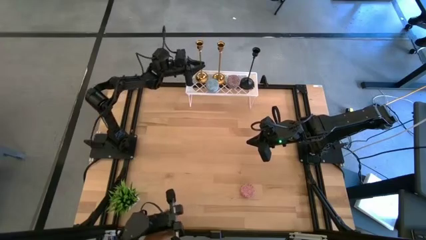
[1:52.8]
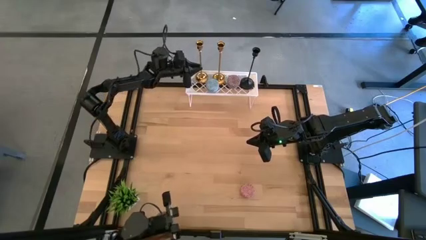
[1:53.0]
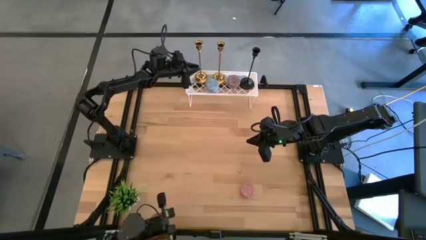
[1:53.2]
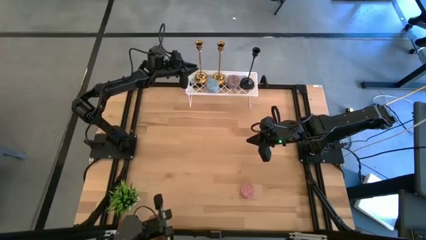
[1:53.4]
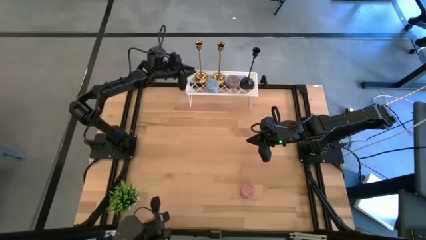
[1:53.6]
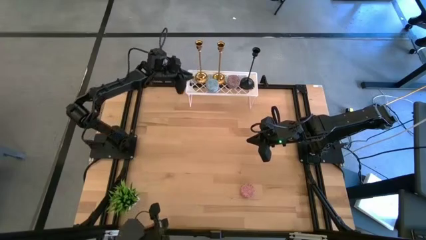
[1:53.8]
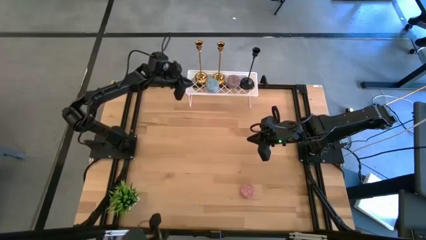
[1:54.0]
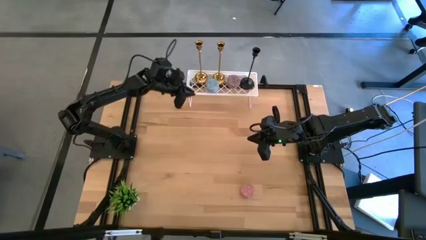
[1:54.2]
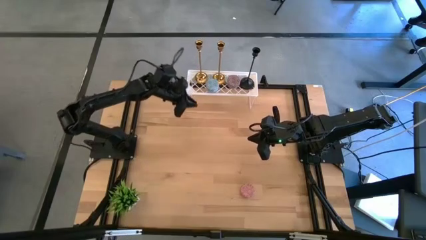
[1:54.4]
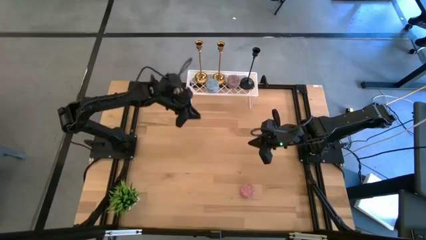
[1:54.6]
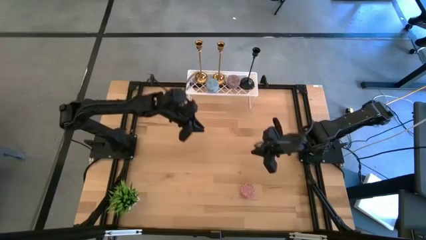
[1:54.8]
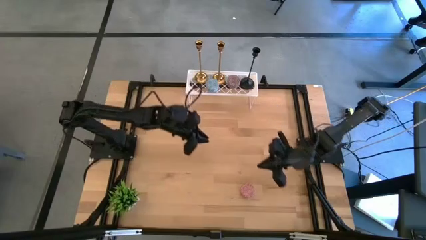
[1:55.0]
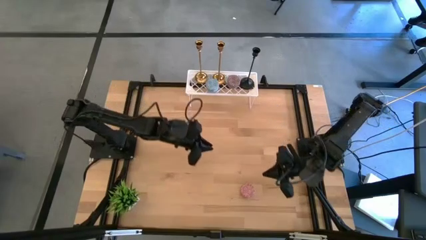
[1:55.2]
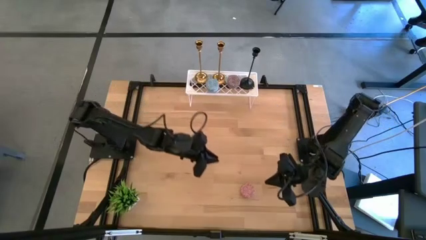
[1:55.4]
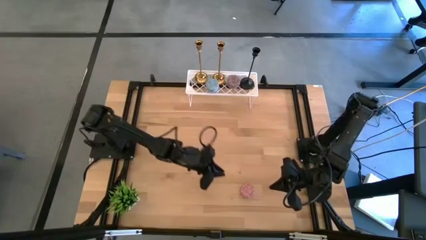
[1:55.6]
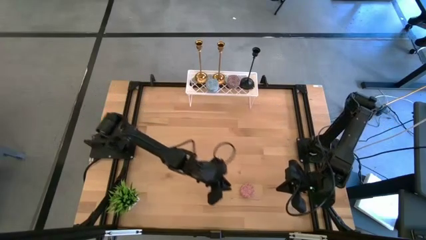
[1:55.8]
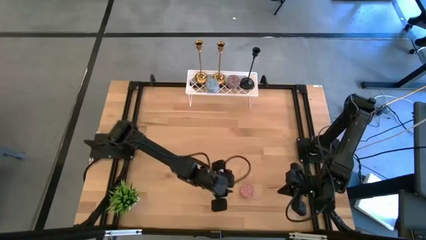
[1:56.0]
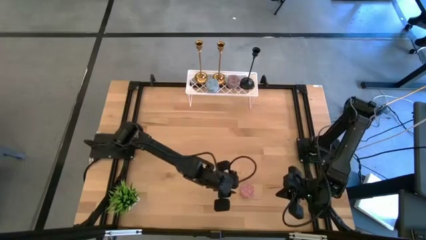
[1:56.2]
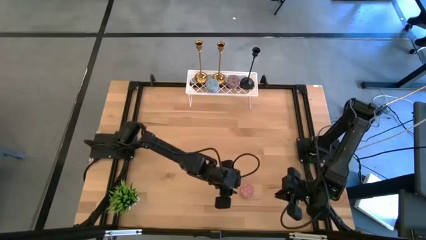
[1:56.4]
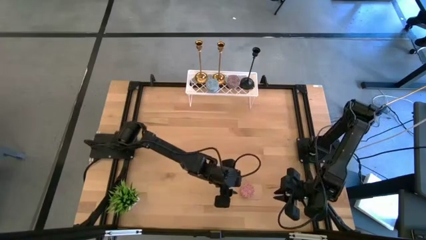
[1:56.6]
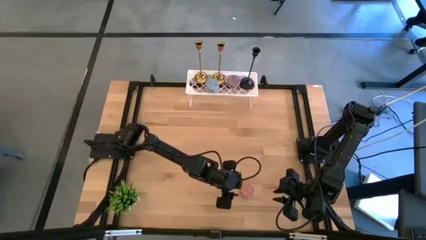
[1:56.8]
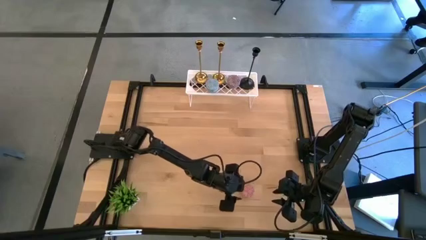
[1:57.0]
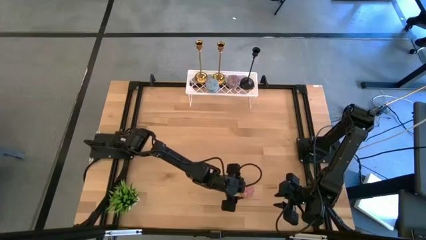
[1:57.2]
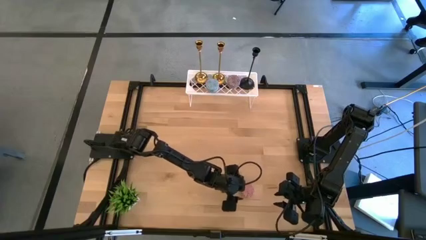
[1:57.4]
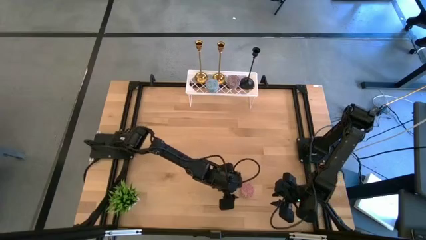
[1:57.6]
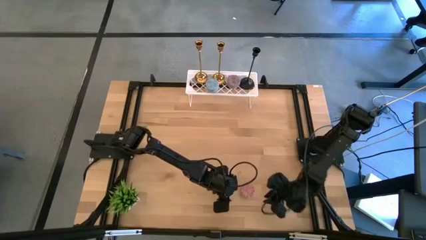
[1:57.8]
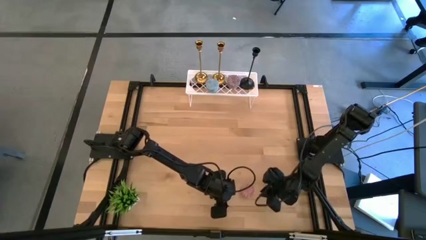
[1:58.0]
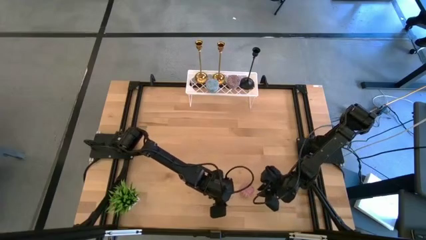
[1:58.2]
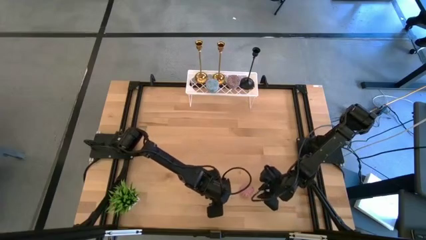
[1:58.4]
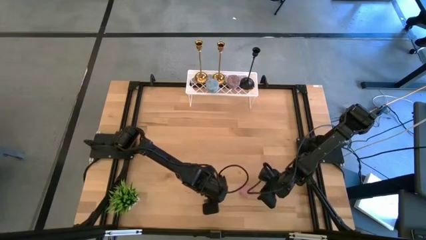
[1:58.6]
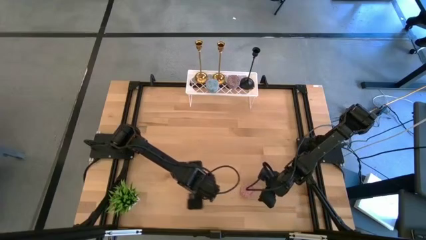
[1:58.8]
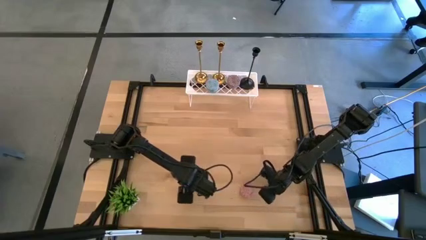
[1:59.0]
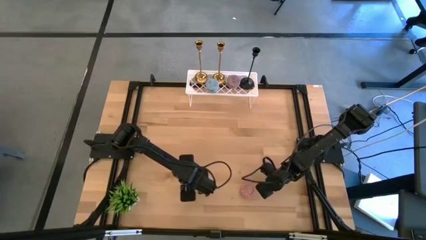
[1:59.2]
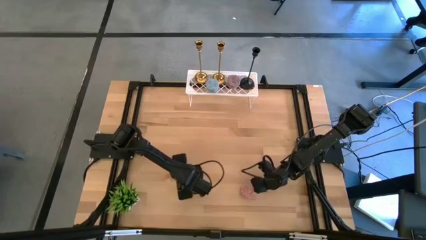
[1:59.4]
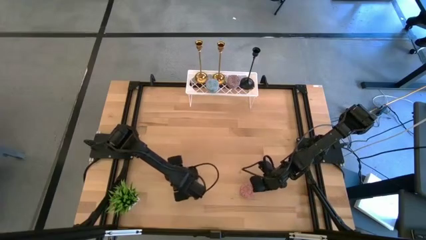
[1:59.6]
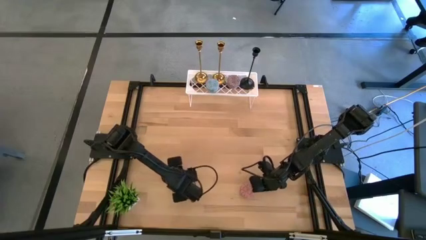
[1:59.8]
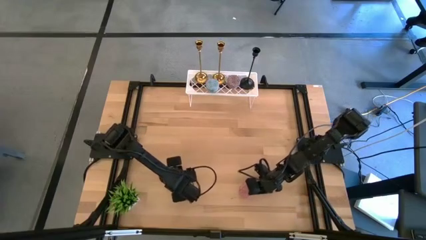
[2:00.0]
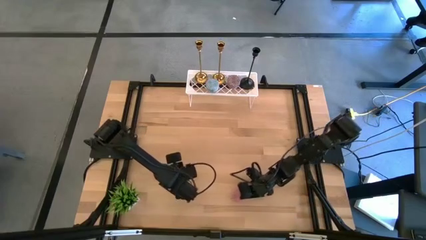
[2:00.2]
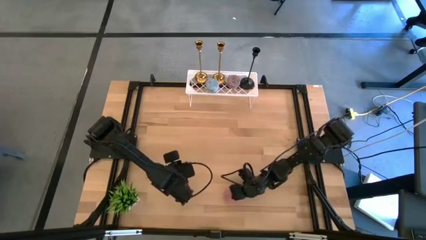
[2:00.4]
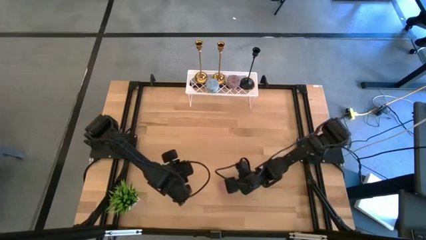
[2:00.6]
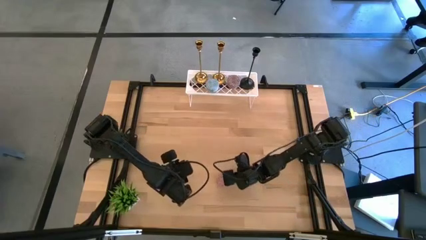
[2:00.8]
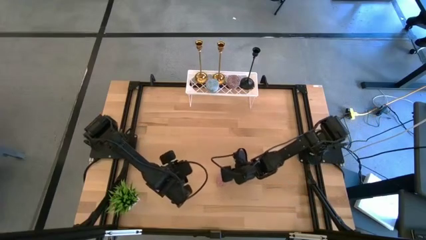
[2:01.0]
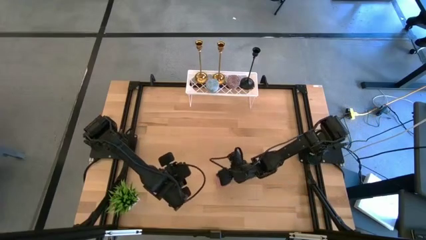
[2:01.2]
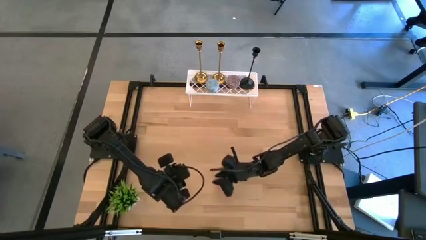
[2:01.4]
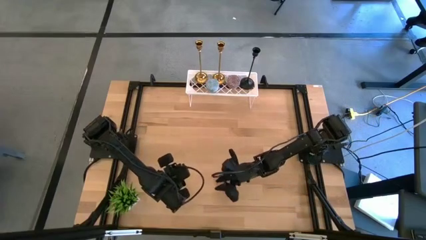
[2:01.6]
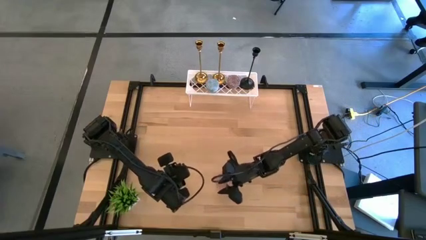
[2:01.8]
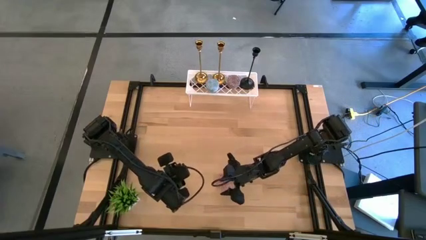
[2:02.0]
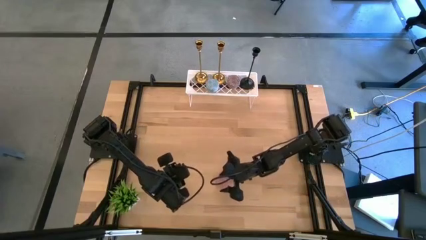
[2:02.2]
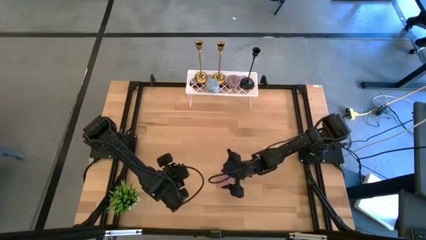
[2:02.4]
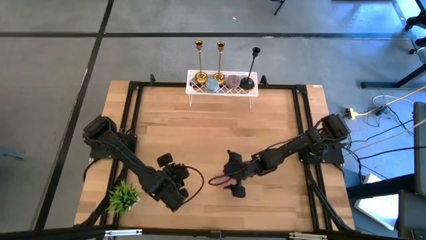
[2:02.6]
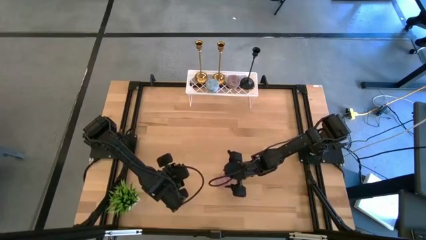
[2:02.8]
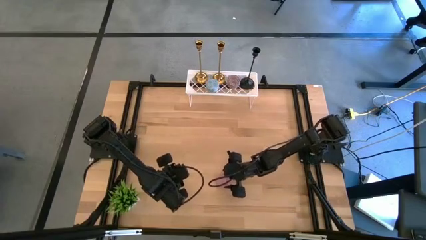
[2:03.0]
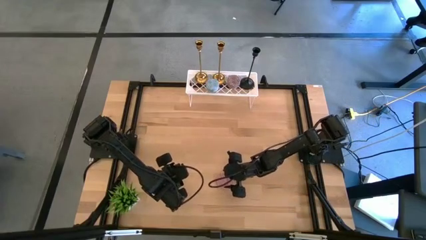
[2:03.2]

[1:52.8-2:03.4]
Task: Pick & Place candle stick holders
Put the scented candle on the shelf
